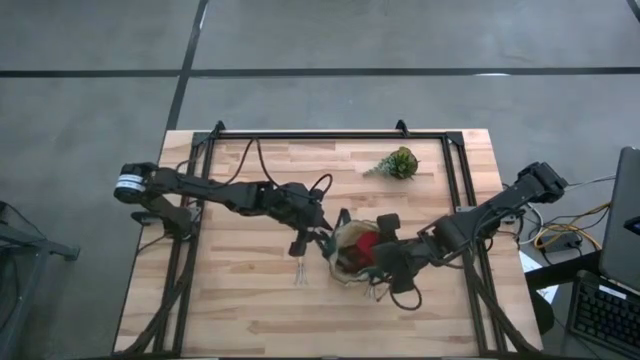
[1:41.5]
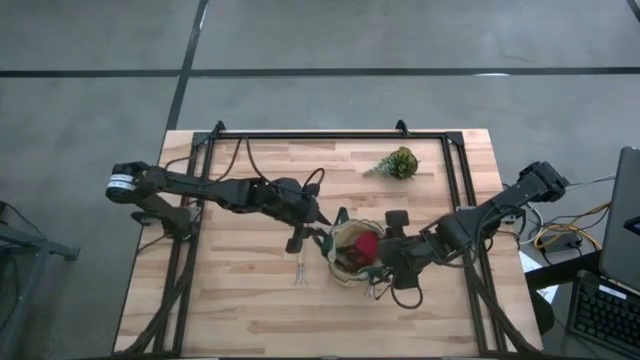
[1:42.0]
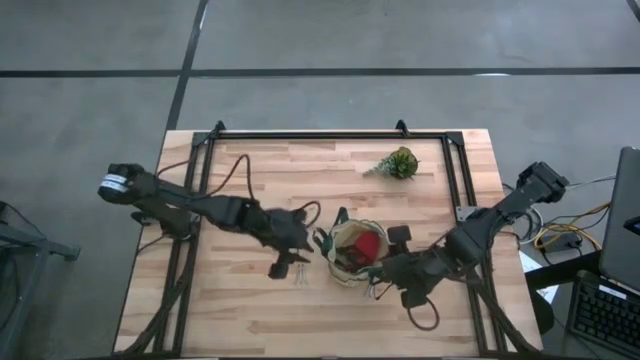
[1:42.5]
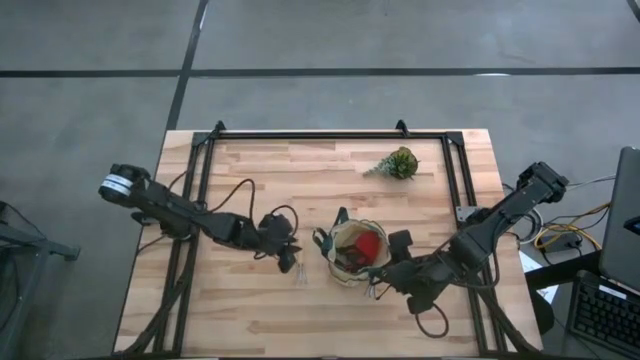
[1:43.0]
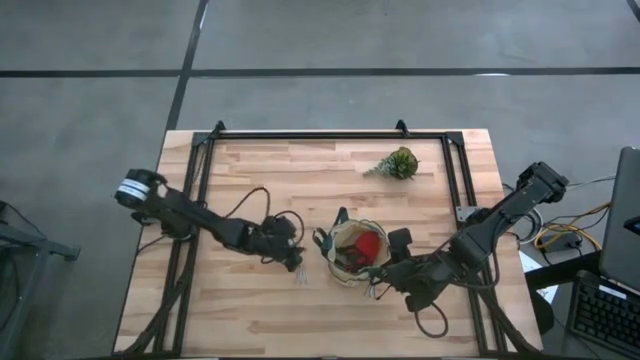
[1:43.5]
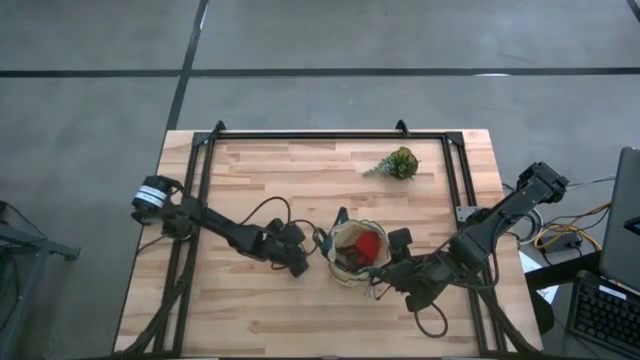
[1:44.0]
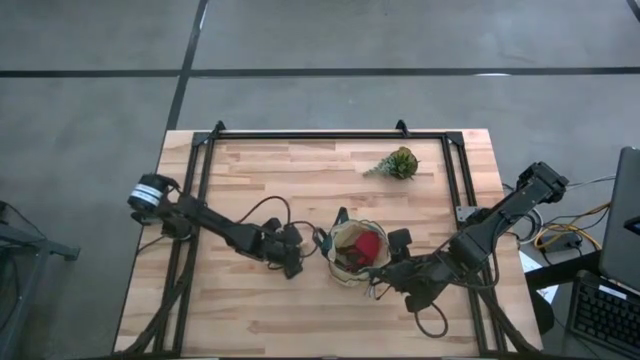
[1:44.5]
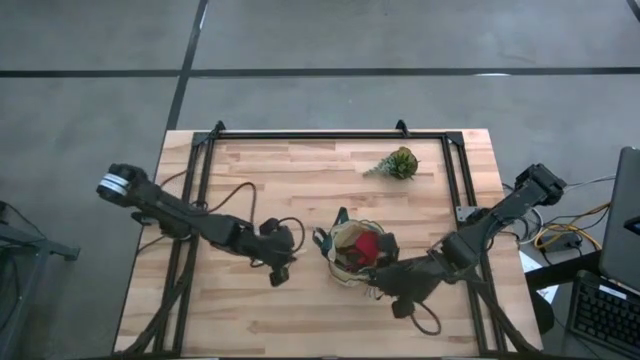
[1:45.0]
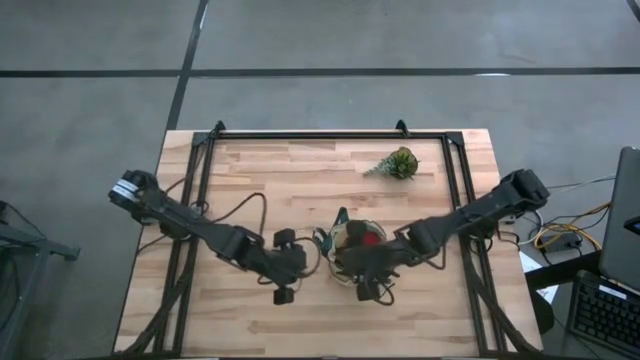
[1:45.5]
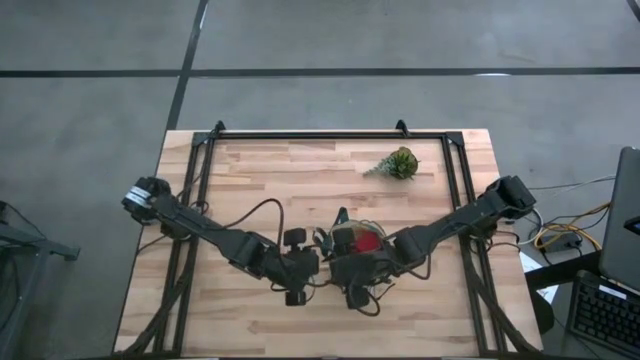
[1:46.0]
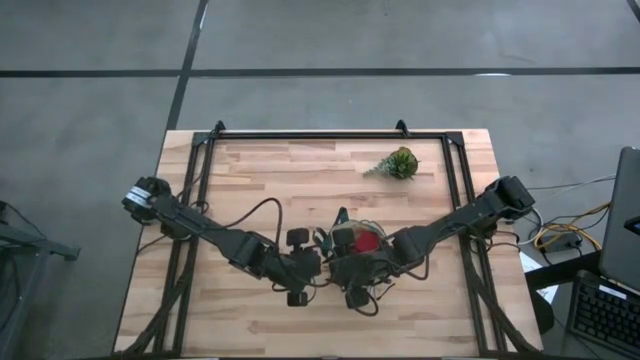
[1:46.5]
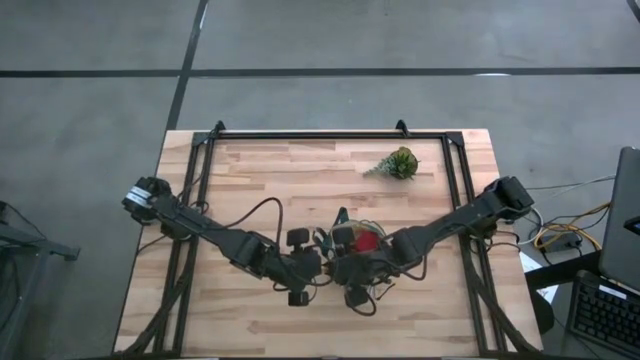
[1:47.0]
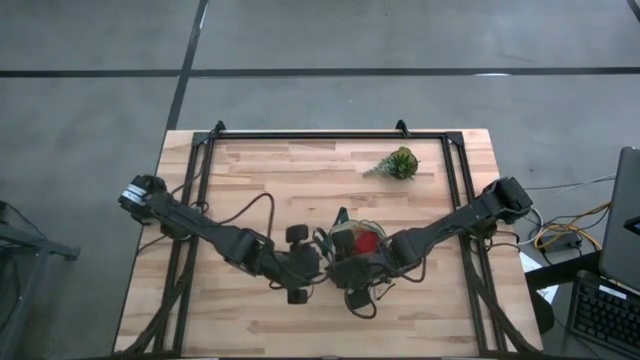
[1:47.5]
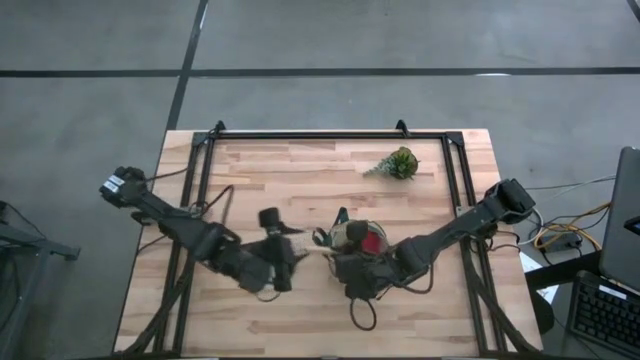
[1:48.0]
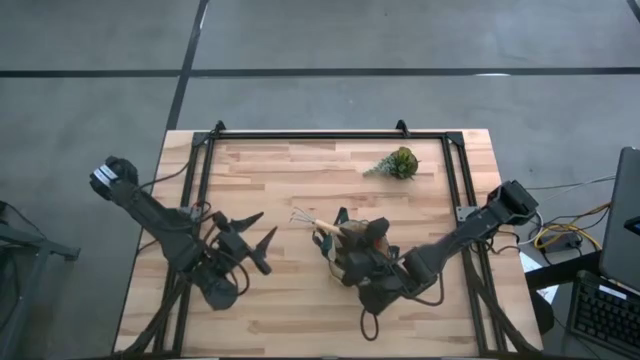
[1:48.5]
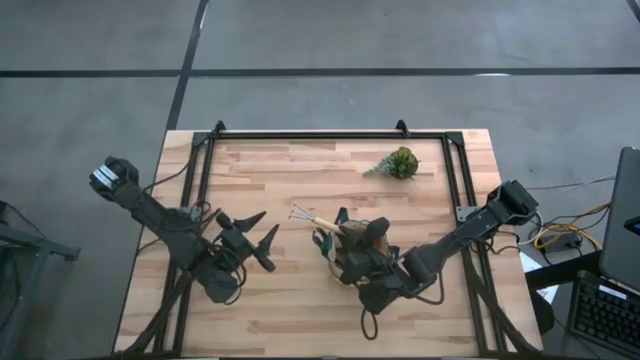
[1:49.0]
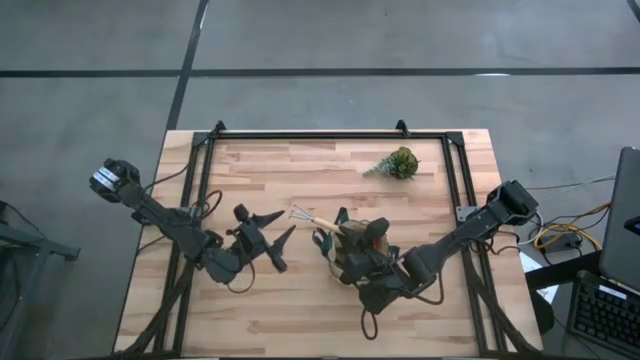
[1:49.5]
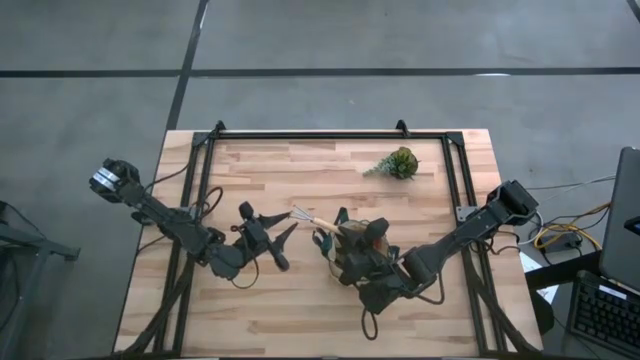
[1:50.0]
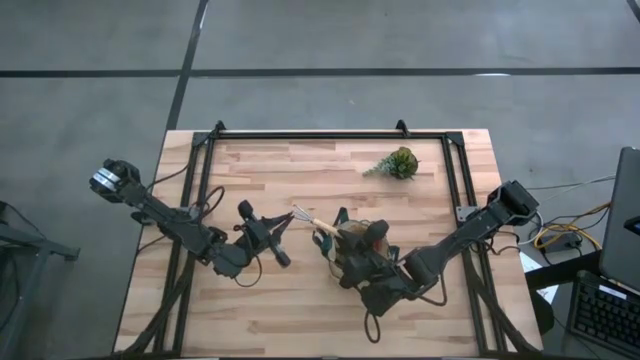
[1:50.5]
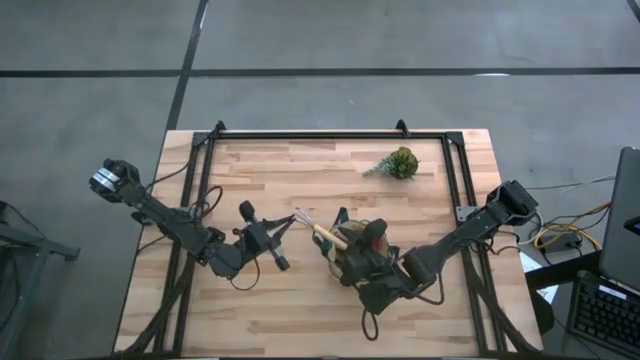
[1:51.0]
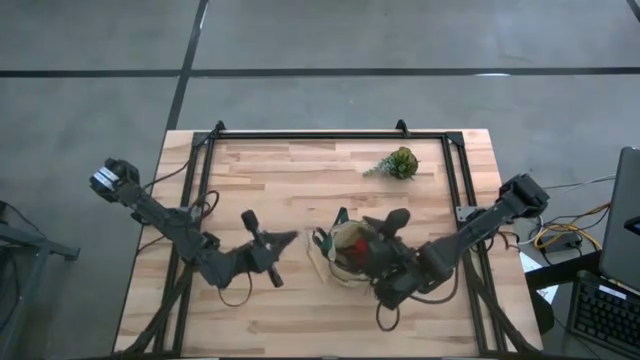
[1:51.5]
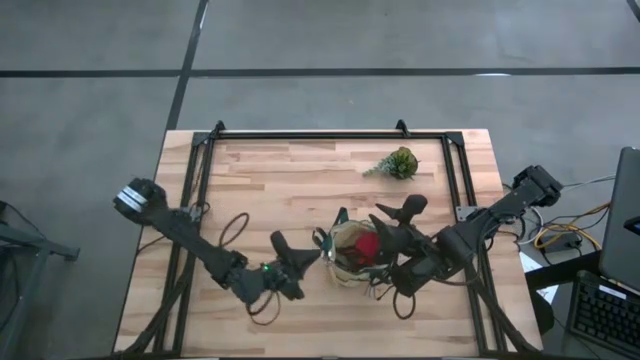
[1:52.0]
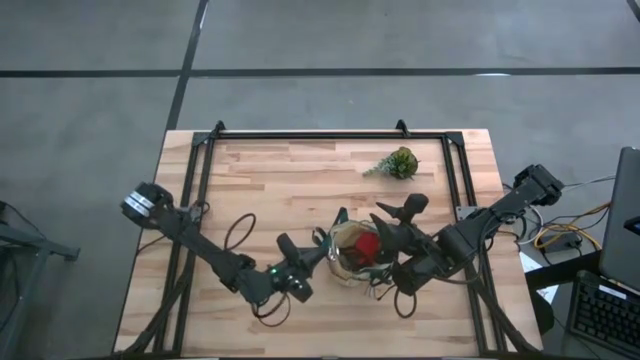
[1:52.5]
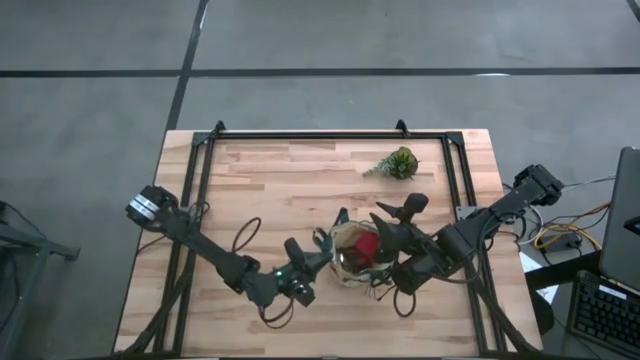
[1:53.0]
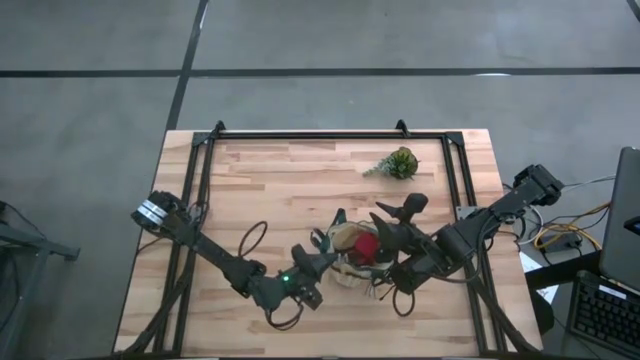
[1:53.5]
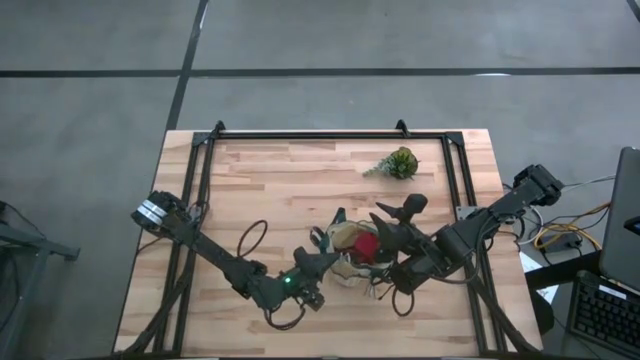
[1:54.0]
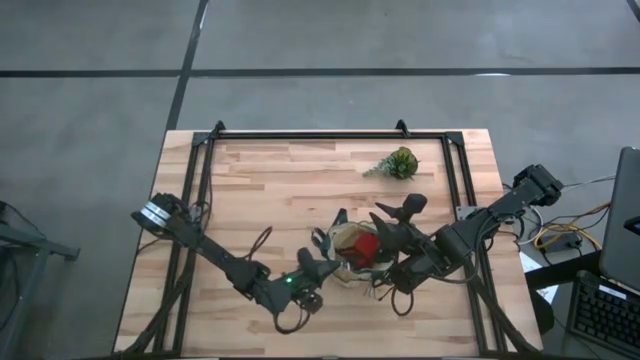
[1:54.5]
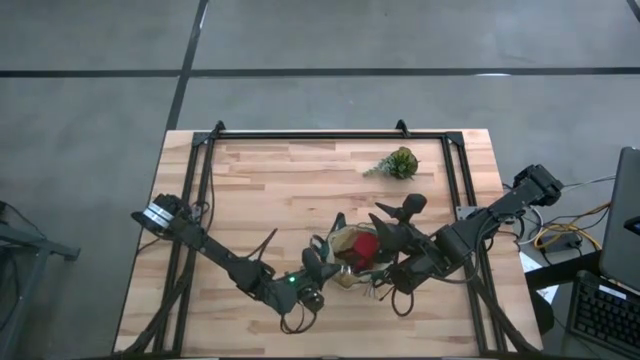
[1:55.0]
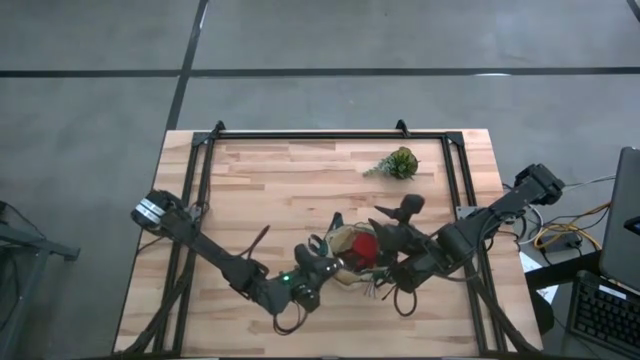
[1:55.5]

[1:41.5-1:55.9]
Task: Pick & Place Garden tools in Gardening bag
Put the left hand rake into the gardening bag

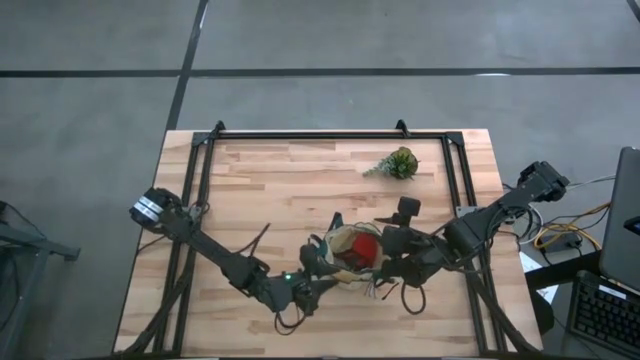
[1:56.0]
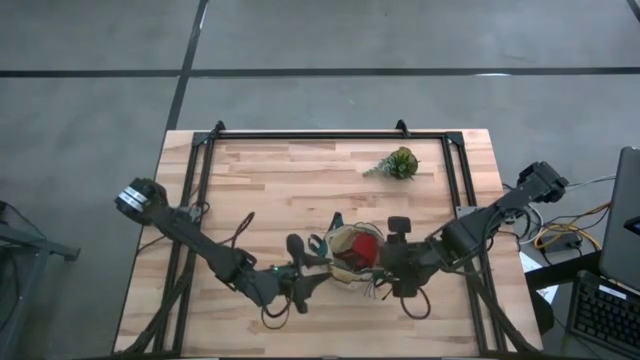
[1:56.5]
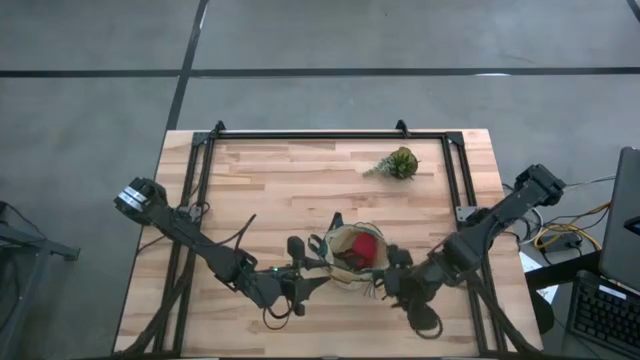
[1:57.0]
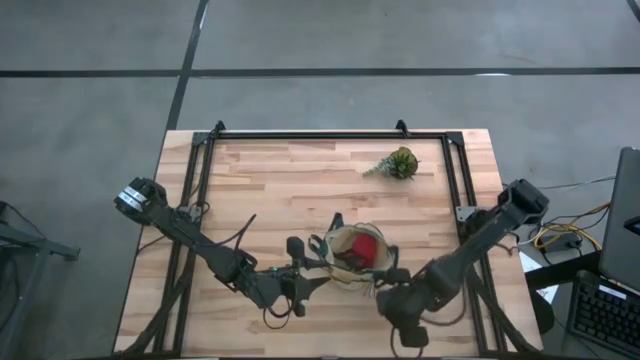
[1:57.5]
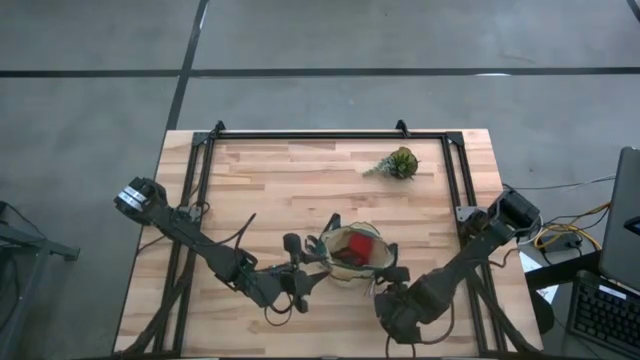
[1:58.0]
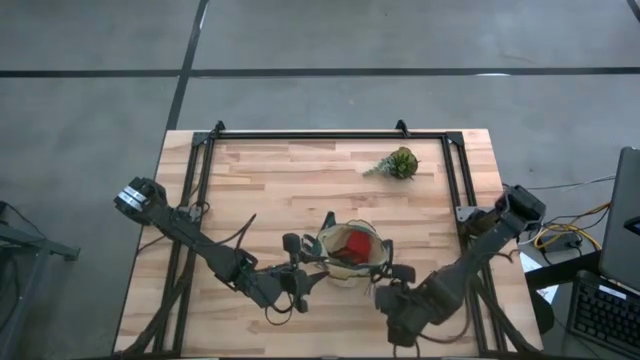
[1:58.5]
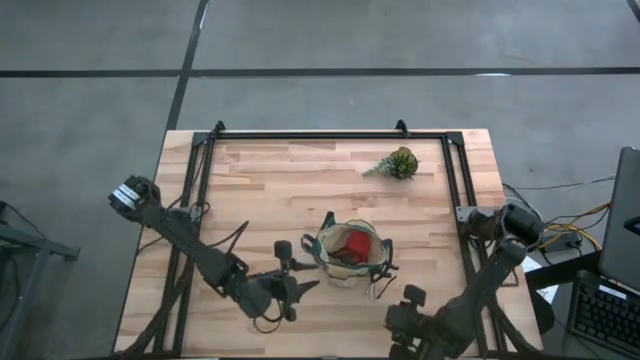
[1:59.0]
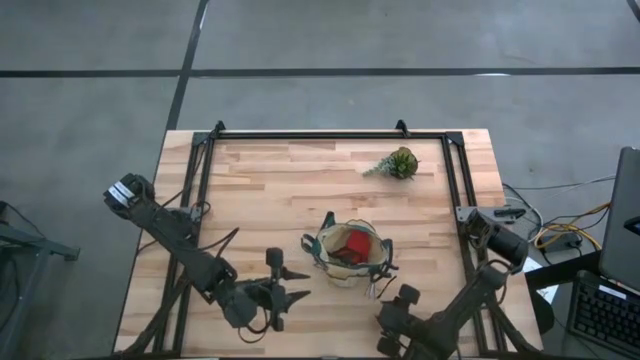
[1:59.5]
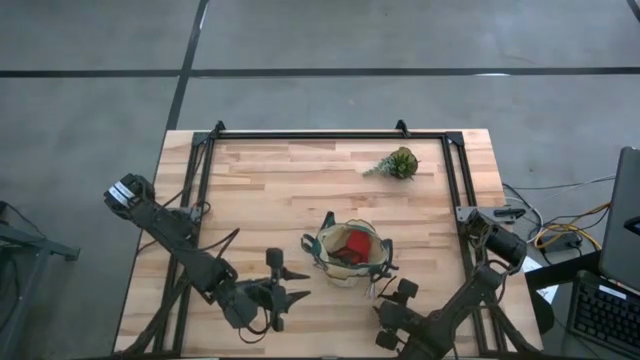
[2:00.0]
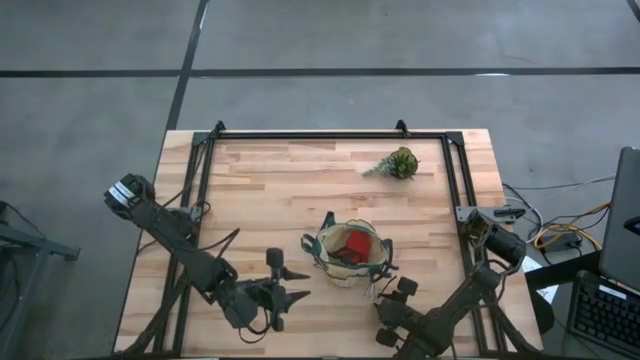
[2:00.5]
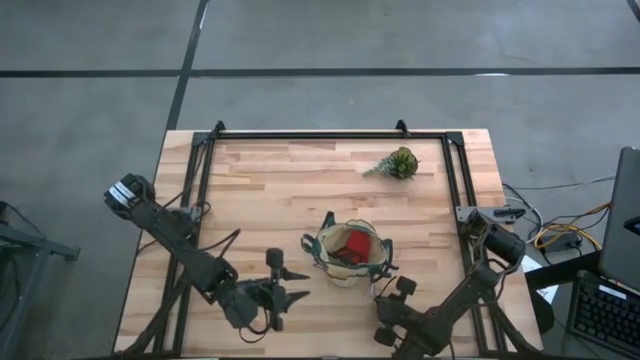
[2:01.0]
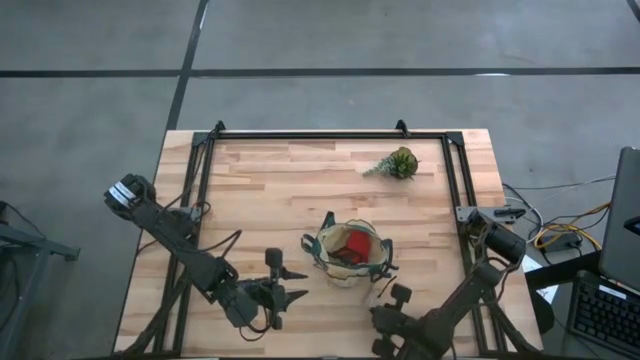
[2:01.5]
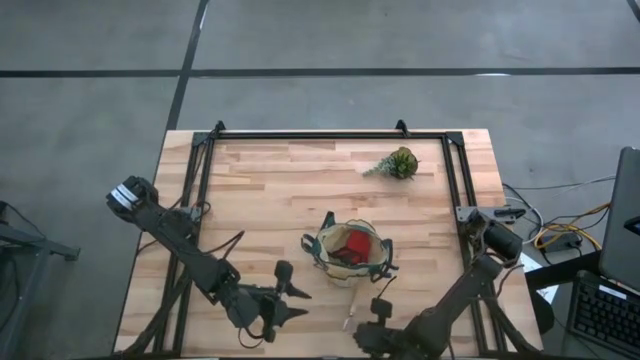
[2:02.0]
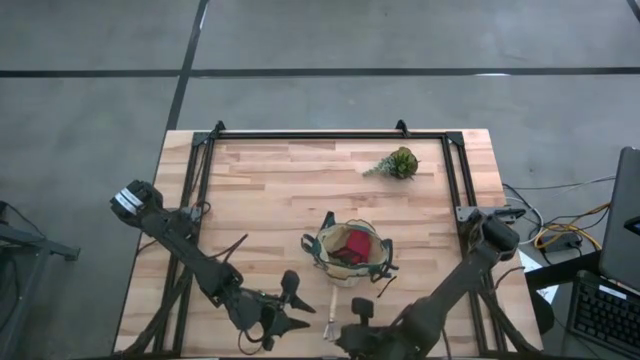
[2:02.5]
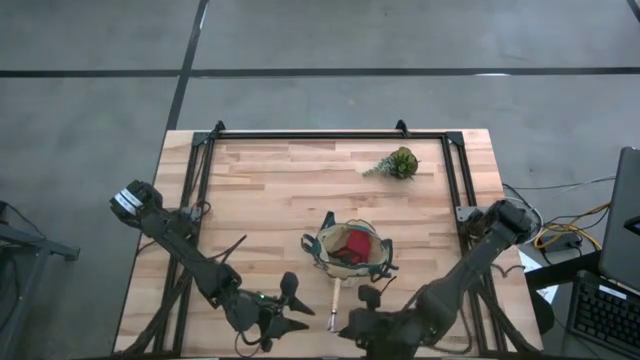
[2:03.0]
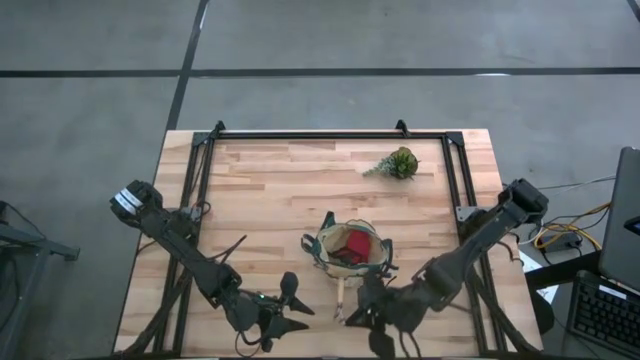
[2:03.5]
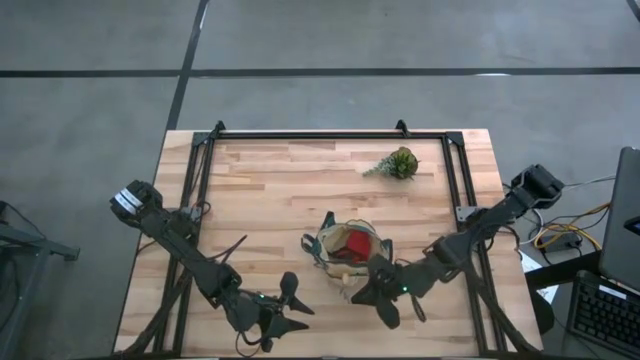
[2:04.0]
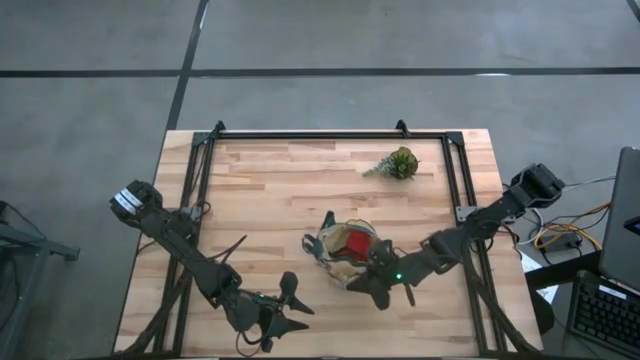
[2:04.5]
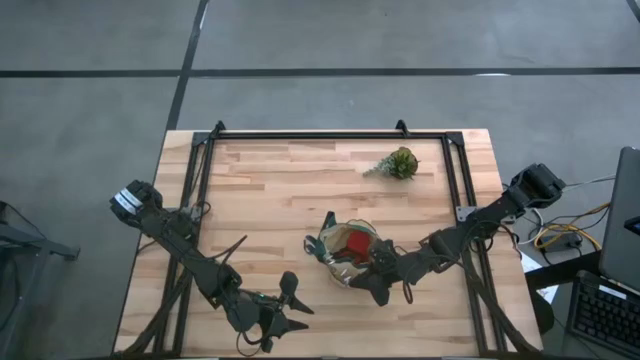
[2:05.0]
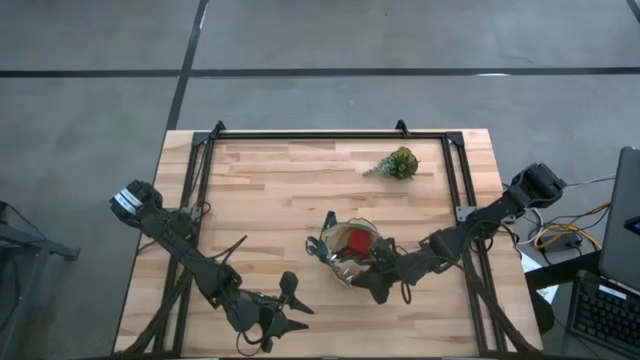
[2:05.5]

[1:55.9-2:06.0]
Put the hand rake into the gardening bag
